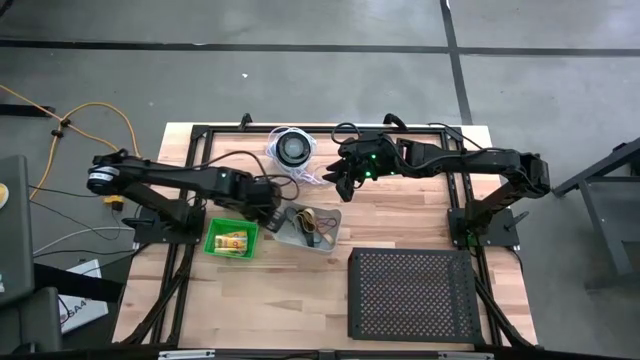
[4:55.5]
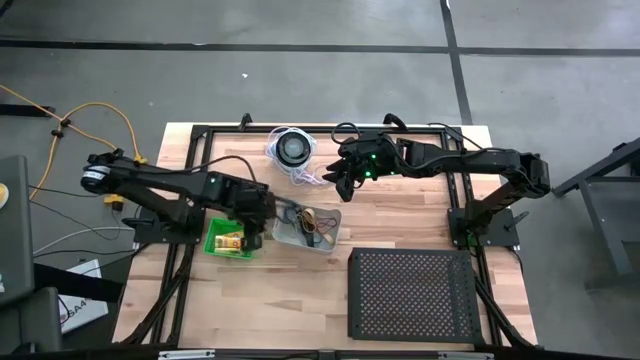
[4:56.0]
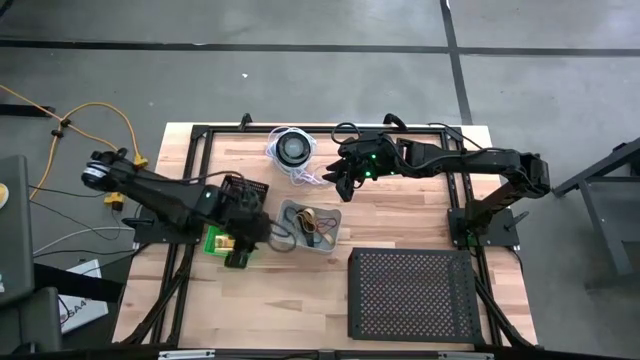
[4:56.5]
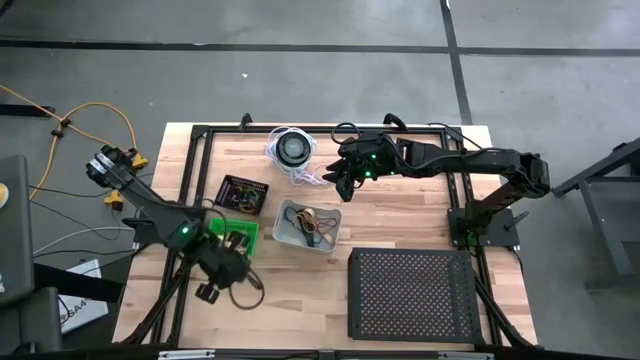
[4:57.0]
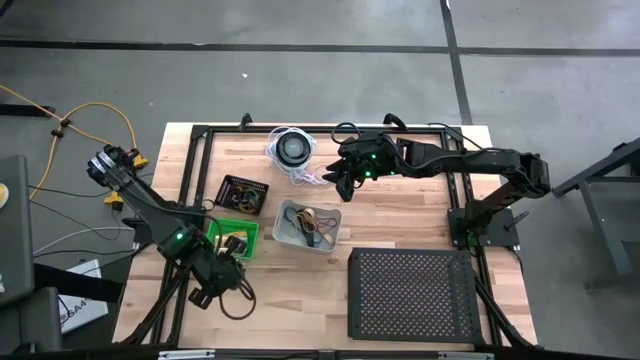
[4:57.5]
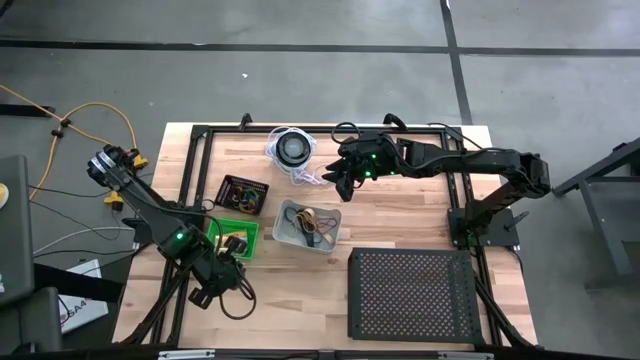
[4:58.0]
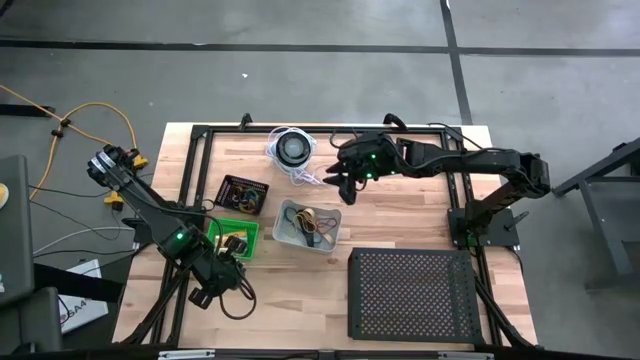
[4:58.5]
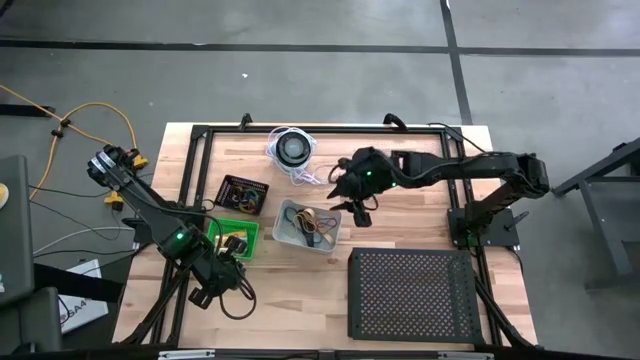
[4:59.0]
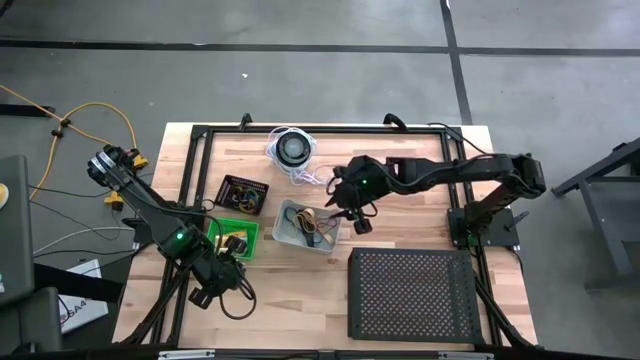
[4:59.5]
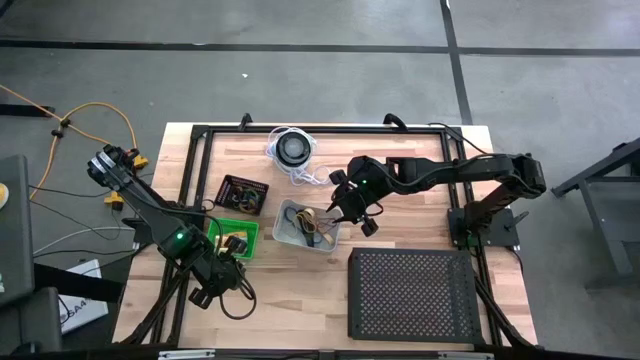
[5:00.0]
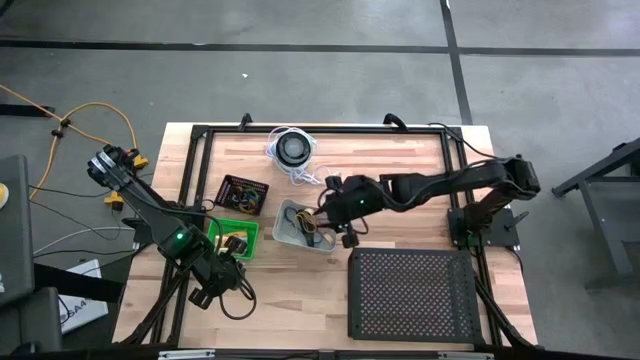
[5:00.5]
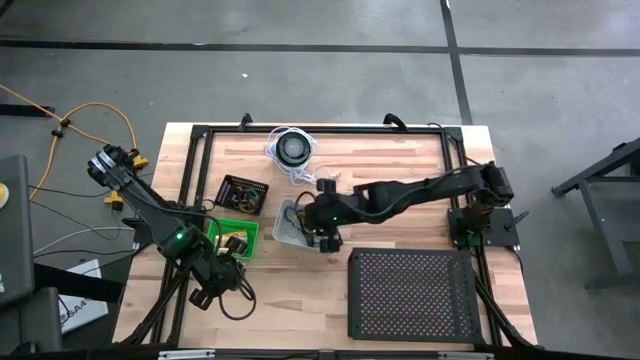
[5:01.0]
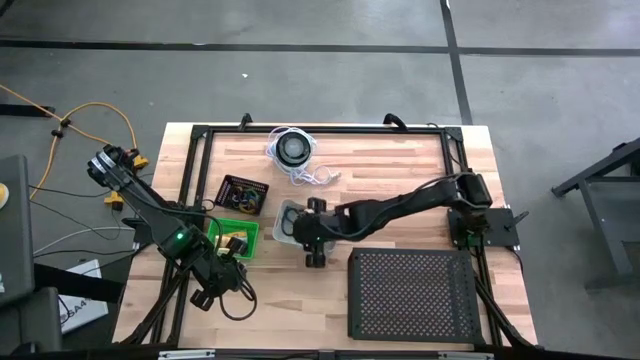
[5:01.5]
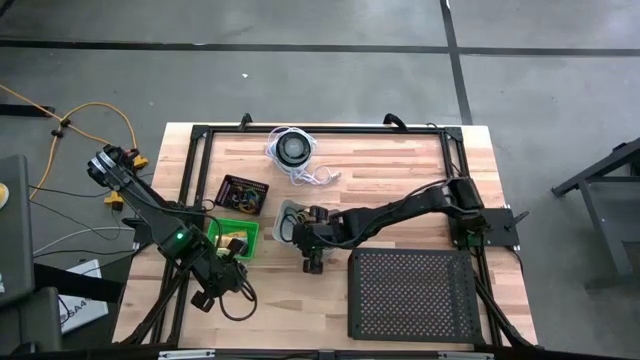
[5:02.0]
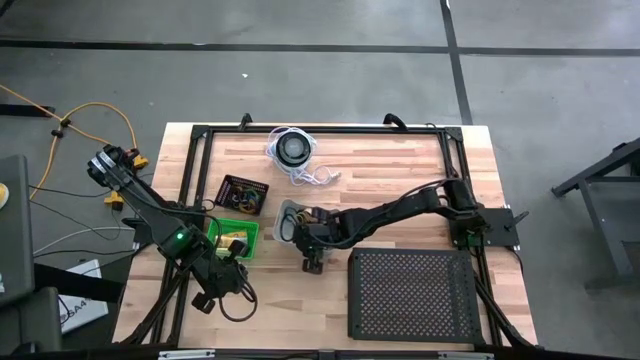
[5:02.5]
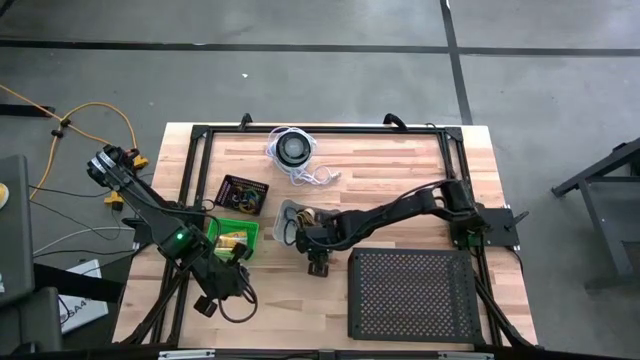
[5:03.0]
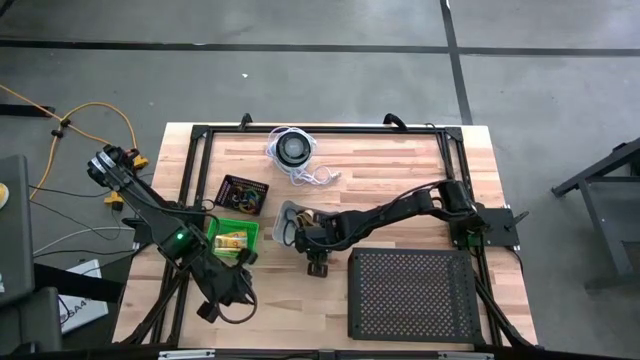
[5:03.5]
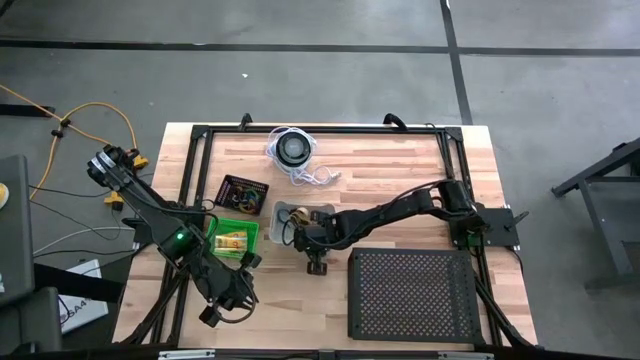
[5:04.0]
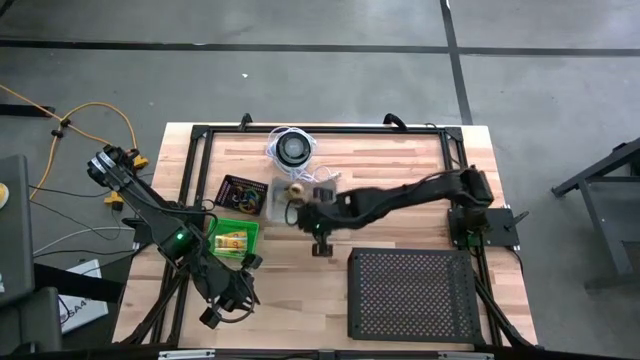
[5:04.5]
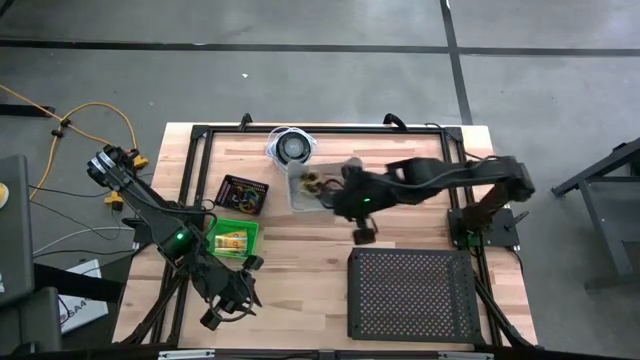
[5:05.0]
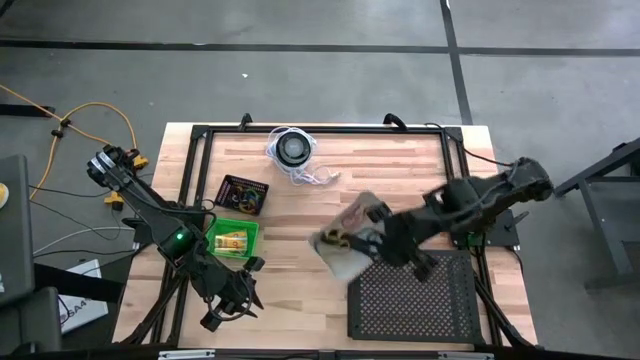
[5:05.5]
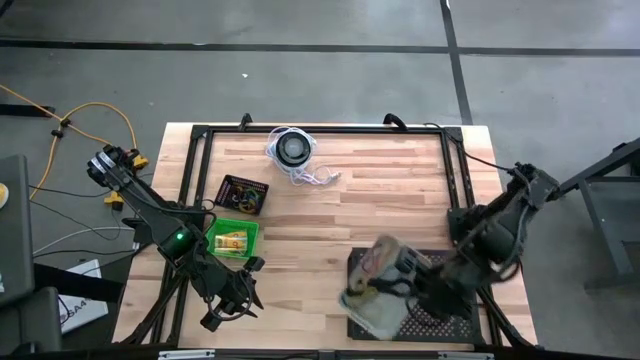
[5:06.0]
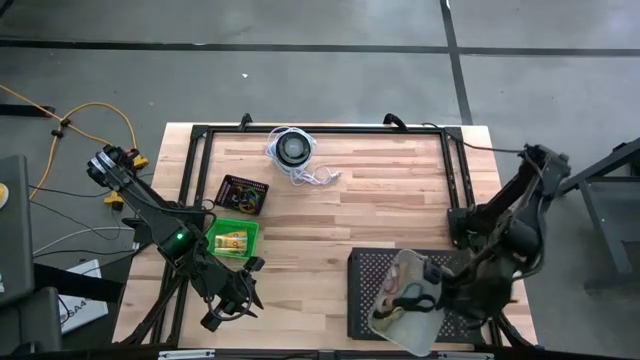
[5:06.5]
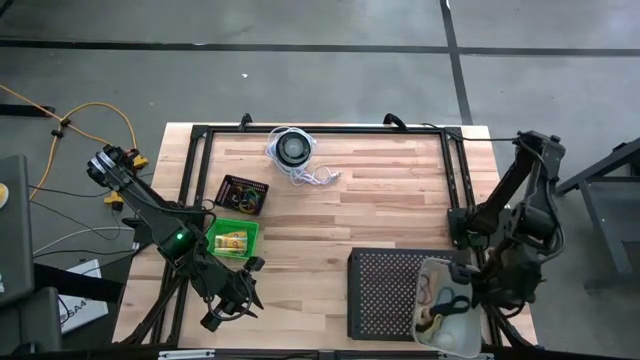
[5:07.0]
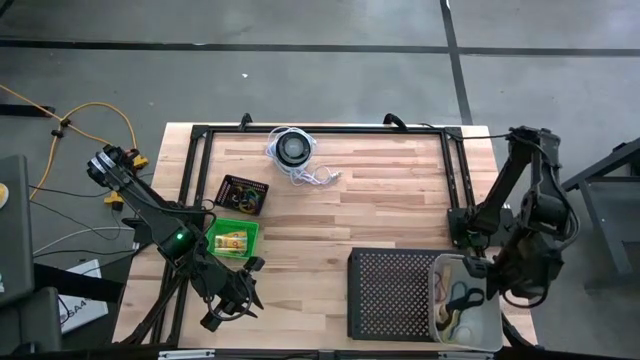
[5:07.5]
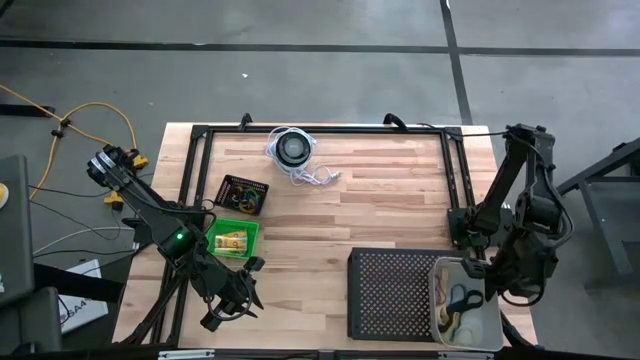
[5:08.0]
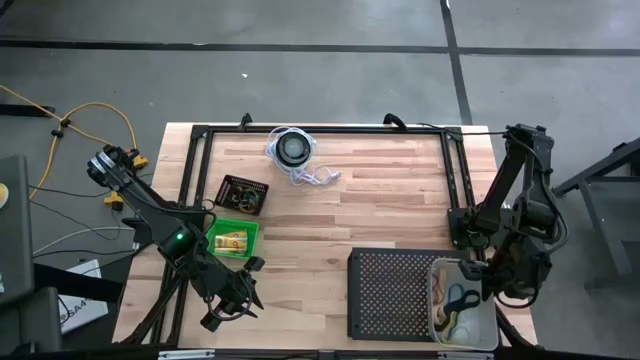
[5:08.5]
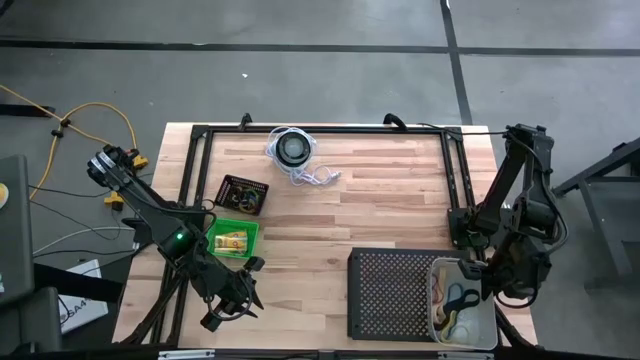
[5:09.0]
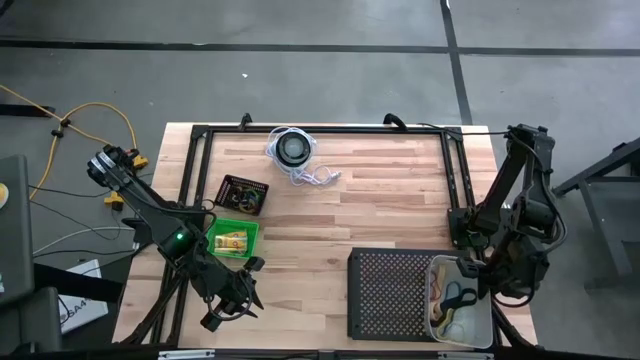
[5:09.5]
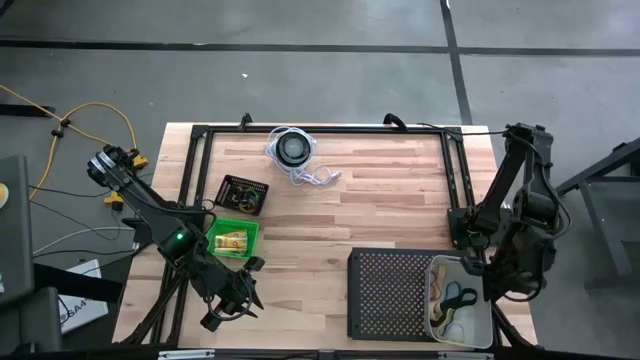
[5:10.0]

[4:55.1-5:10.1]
Task: Pick & Place Office Desk Supplies
Put the gray bin on the shelf

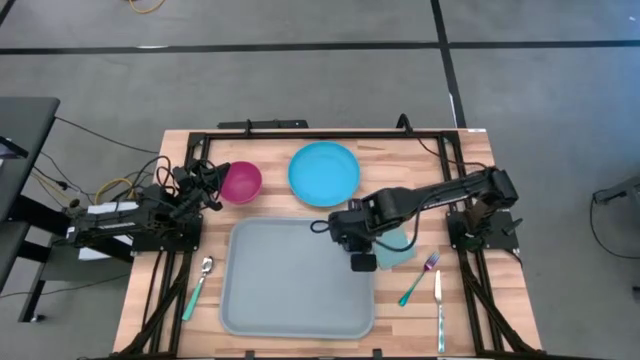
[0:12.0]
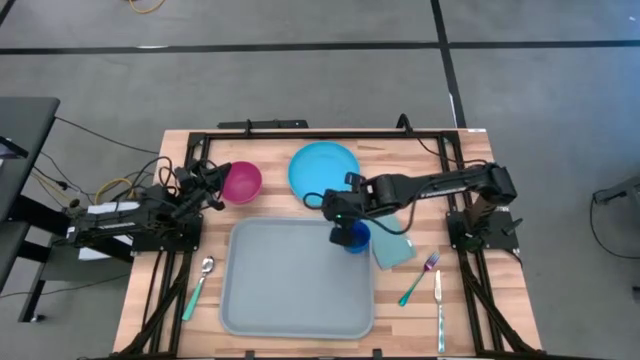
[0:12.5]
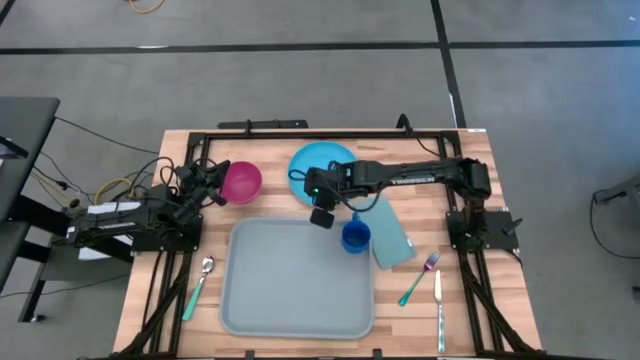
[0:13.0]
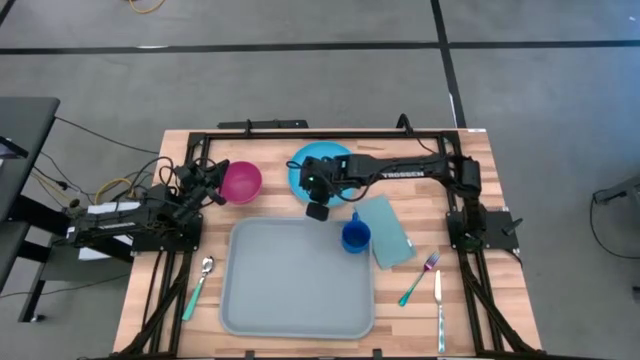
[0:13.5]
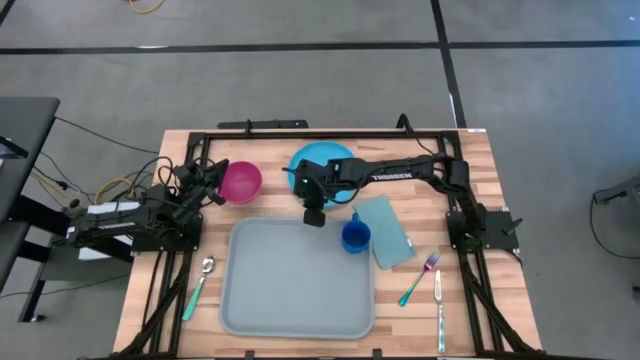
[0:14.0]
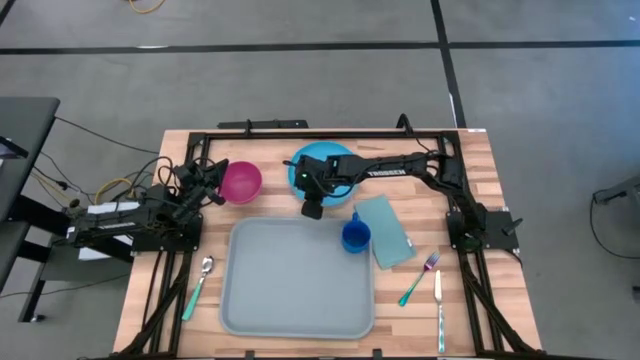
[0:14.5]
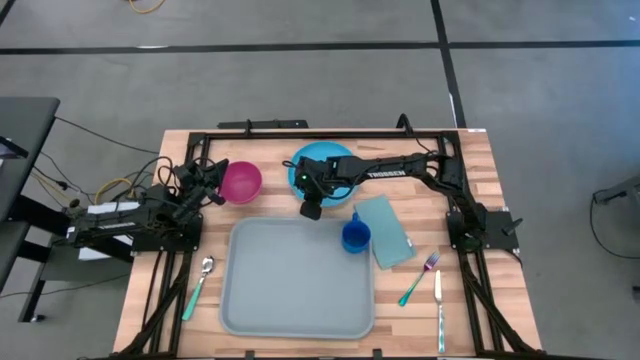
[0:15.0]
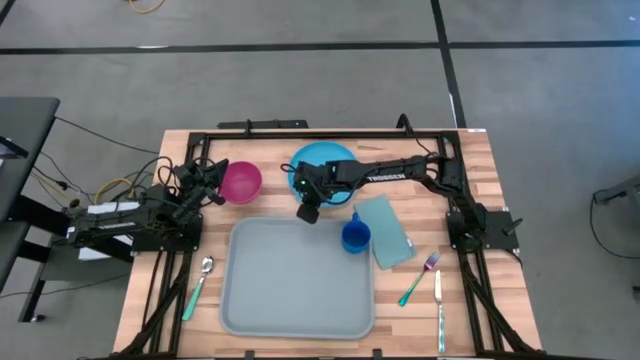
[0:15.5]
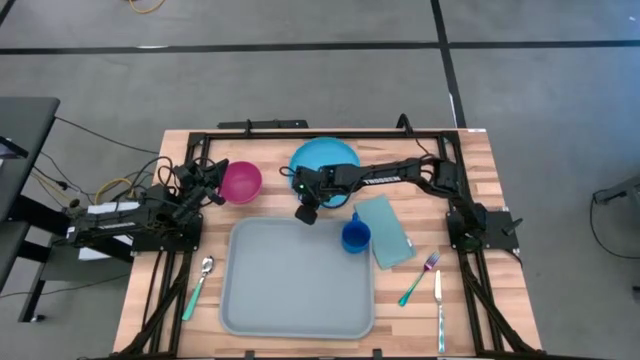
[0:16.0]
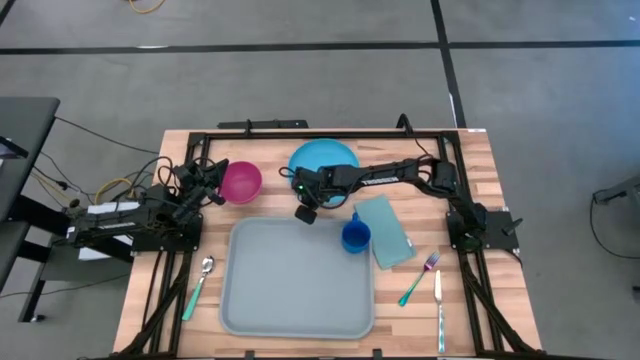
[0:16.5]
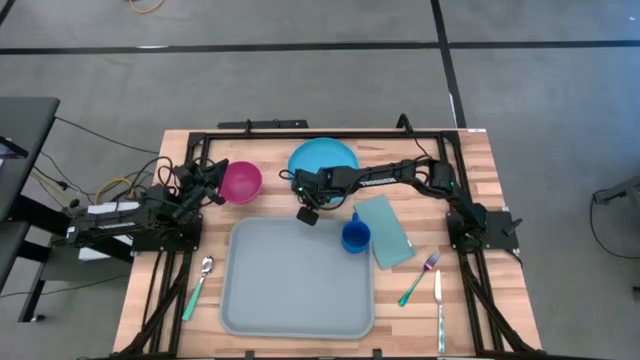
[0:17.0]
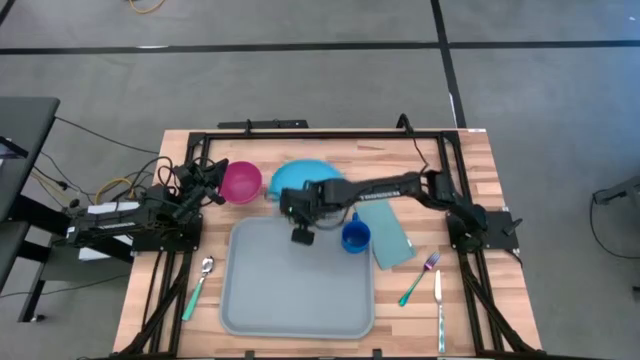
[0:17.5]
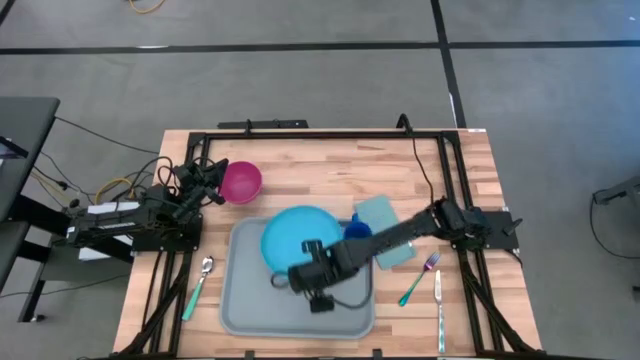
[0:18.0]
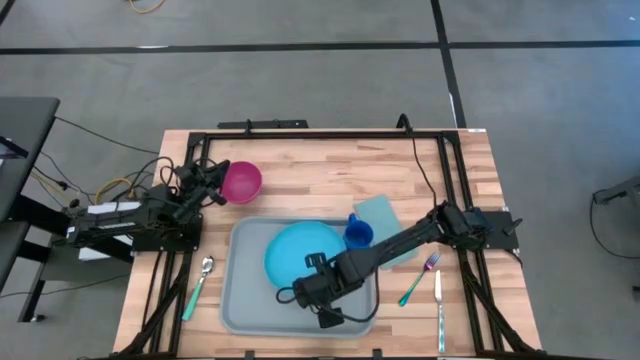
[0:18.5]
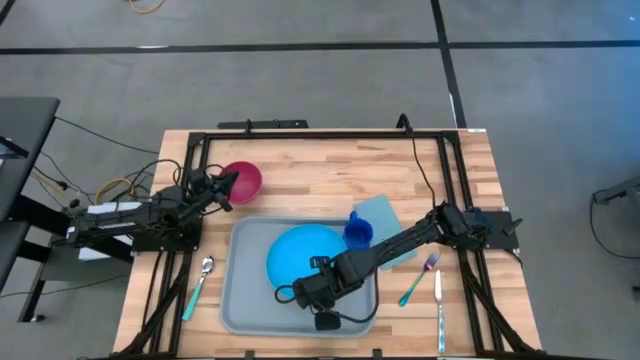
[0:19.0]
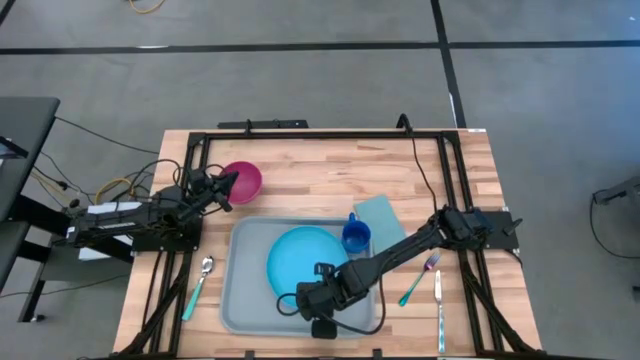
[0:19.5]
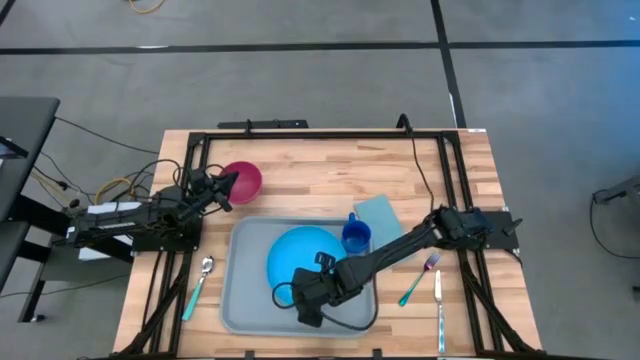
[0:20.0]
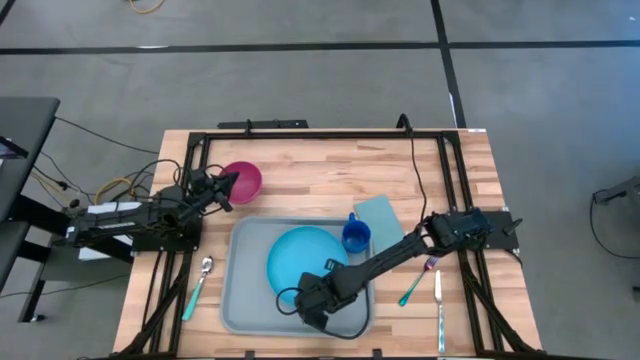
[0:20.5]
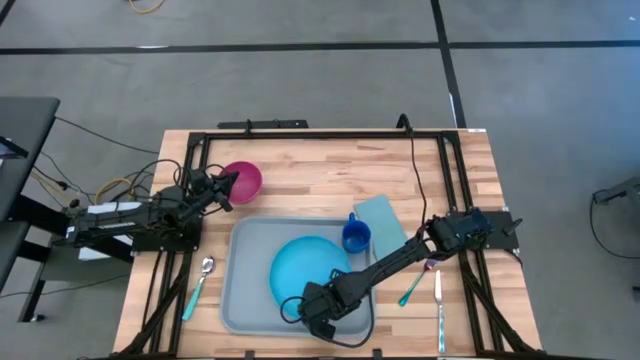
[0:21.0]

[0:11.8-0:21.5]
Task: Set up tray
Put the light blue plate to the left of the blue mug on the gray tray
